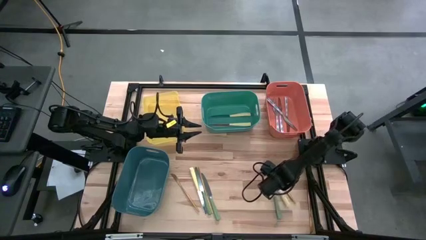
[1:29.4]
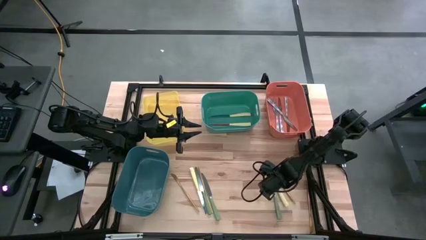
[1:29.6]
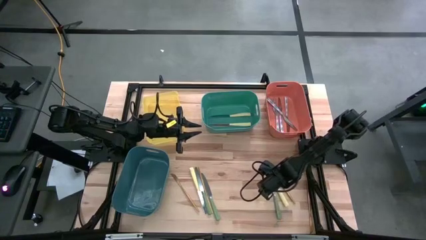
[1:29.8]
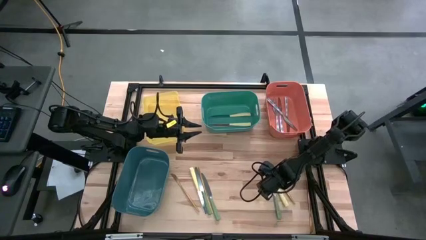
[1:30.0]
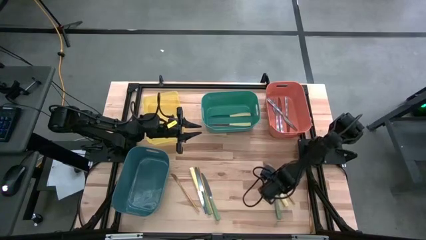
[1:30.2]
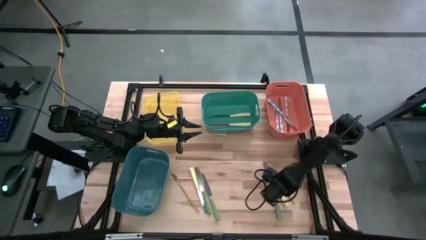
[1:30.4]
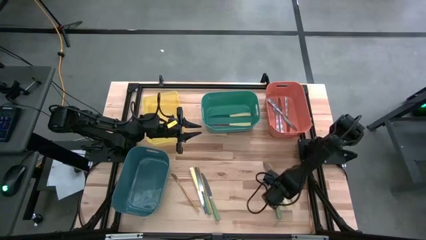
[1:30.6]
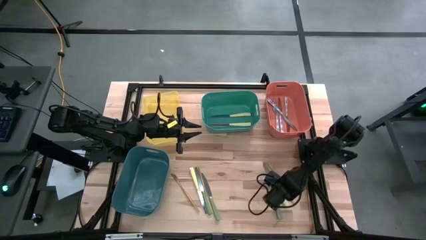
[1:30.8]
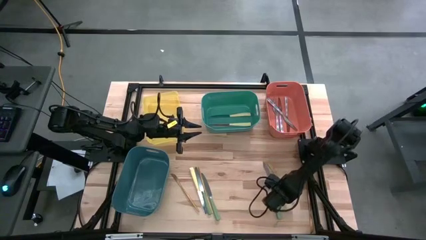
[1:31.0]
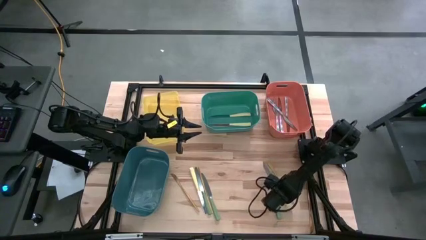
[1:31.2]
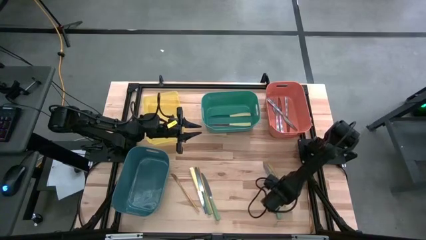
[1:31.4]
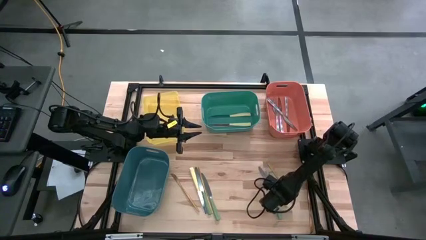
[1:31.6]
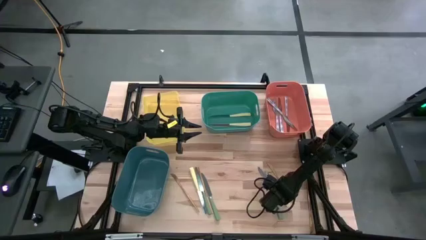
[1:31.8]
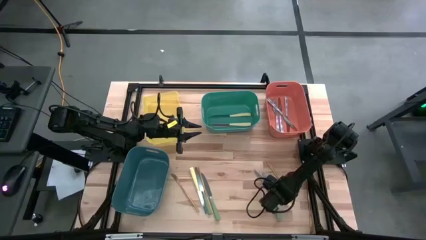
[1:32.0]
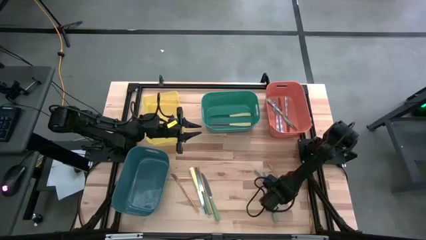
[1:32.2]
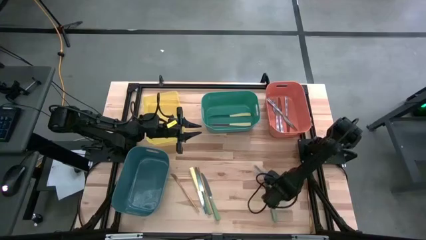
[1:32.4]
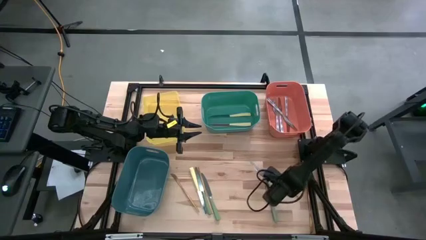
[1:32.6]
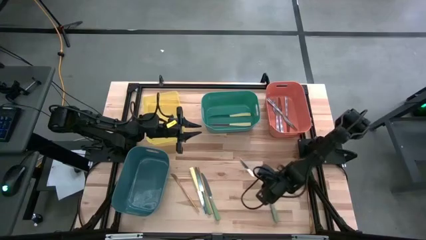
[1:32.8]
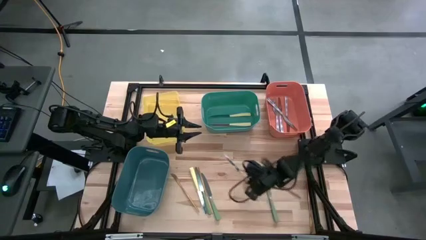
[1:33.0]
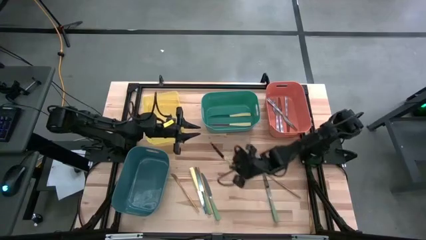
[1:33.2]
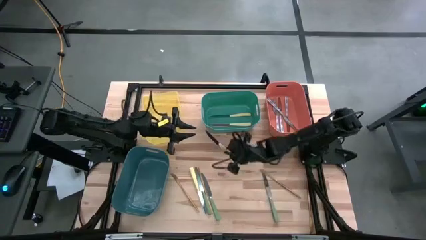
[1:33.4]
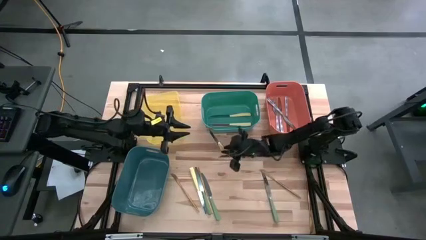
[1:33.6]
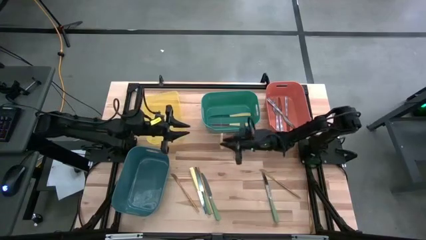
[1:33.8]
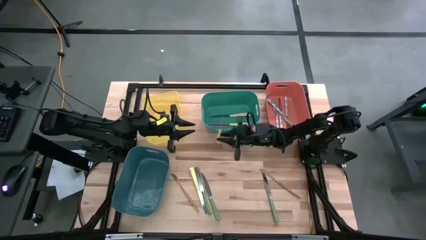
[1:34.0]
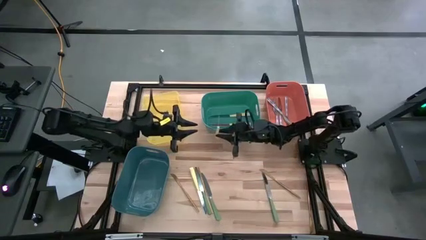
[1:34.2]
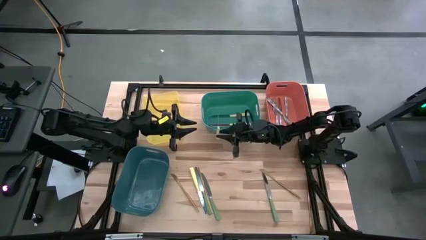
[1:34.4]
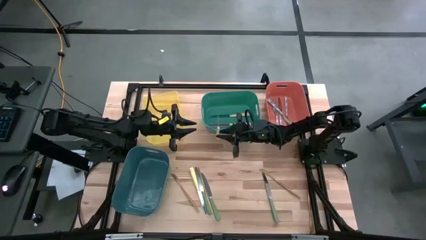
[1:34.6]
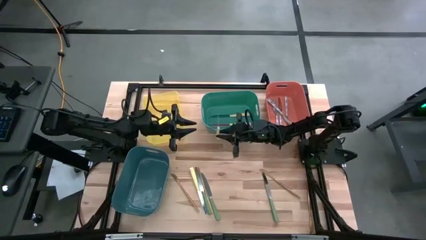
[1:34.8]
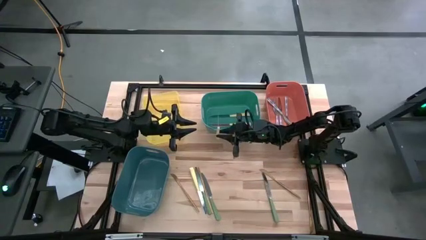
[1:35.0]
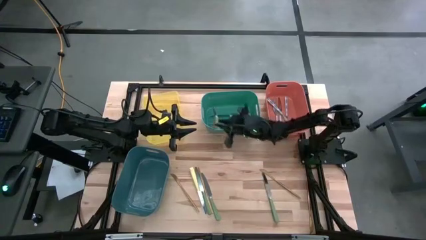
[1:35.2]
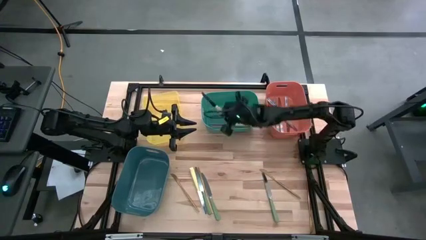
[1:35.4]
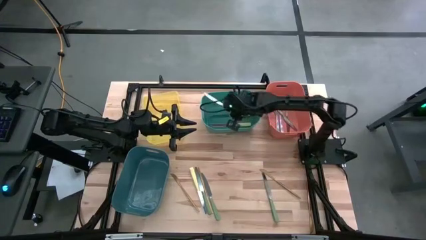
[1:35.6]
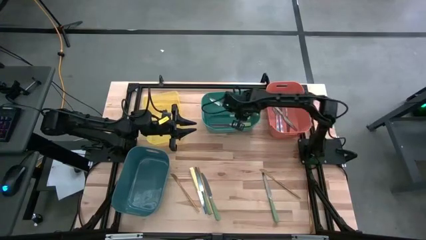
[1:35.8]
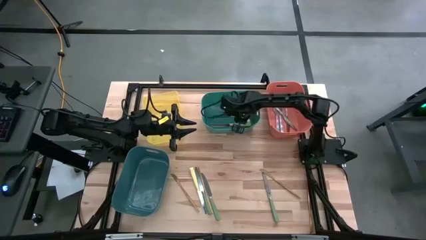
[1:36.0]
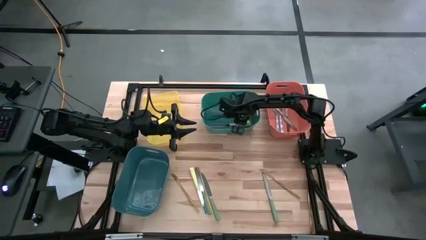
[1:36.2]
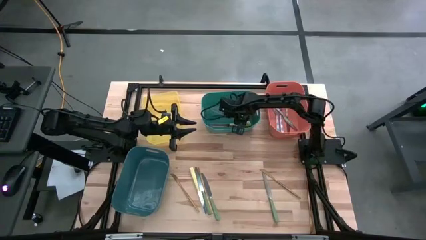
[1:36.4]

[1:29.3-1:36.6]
Task: Sort silverware by color (type)
Put the yellow knife into the green bin

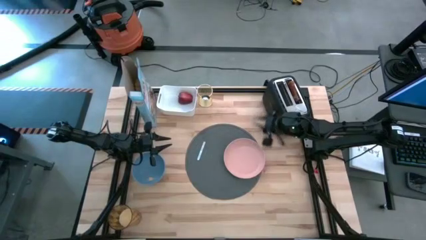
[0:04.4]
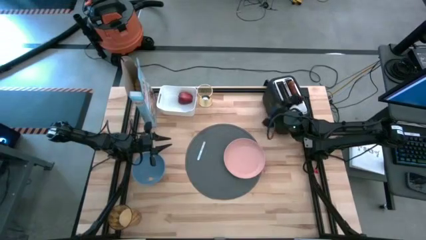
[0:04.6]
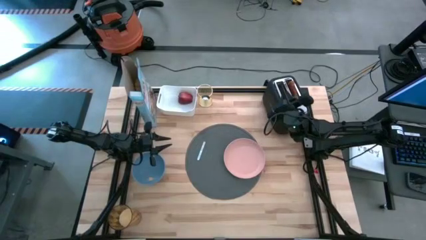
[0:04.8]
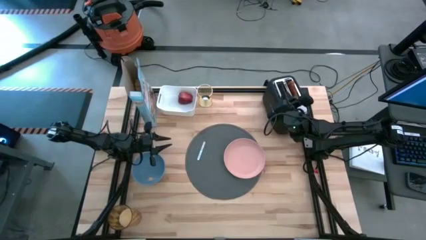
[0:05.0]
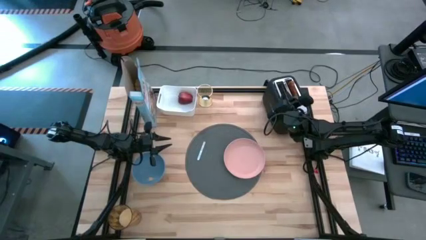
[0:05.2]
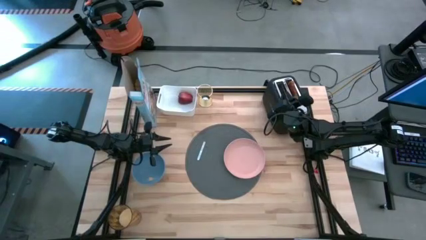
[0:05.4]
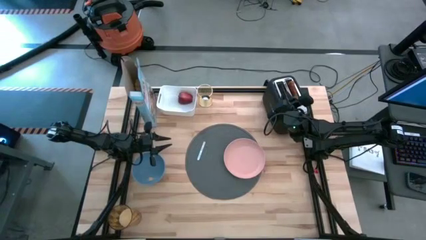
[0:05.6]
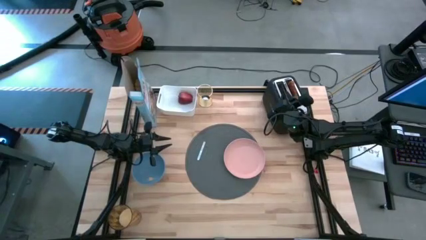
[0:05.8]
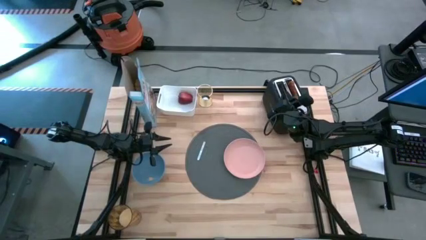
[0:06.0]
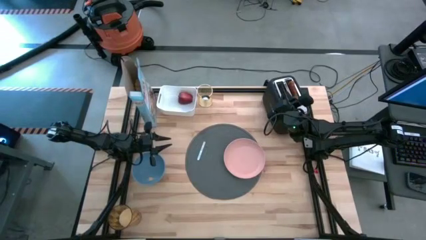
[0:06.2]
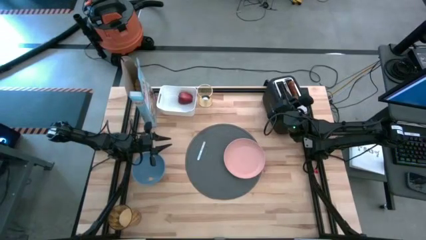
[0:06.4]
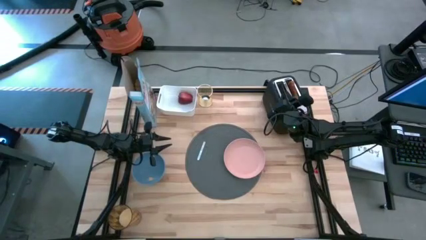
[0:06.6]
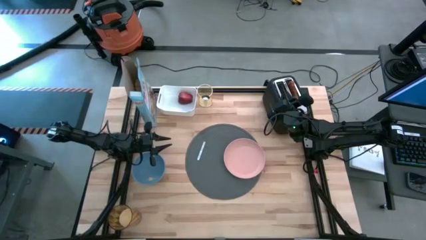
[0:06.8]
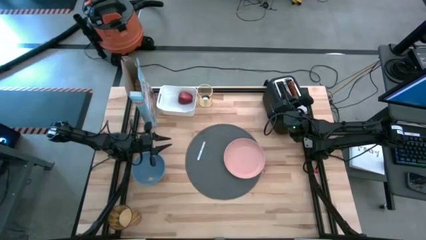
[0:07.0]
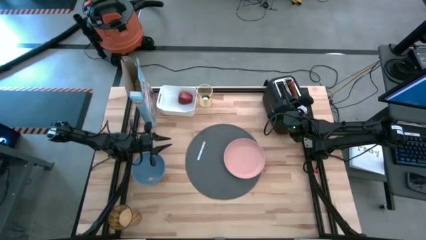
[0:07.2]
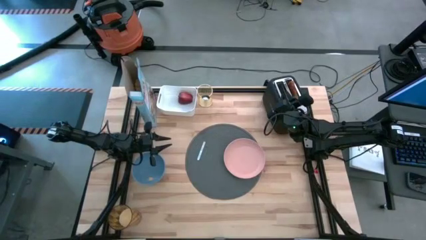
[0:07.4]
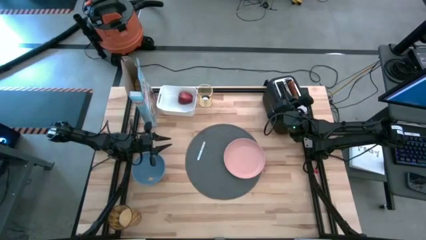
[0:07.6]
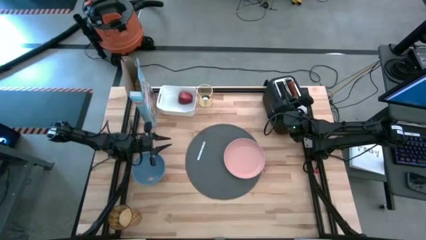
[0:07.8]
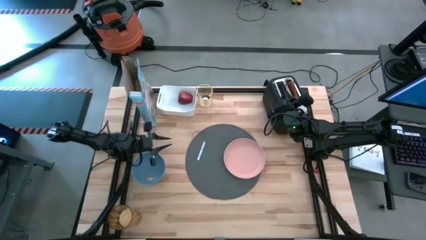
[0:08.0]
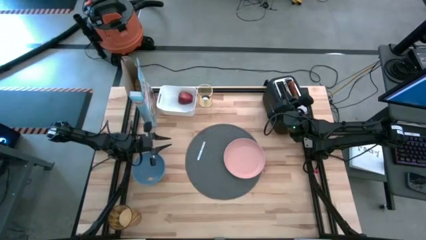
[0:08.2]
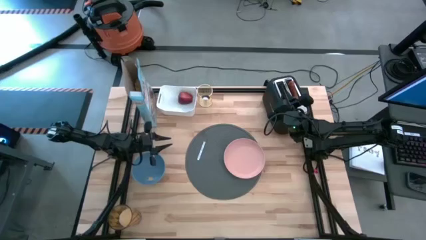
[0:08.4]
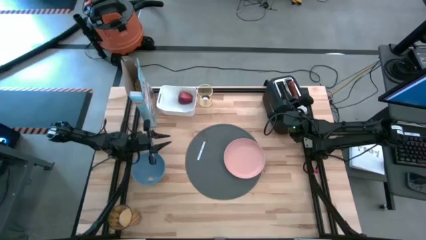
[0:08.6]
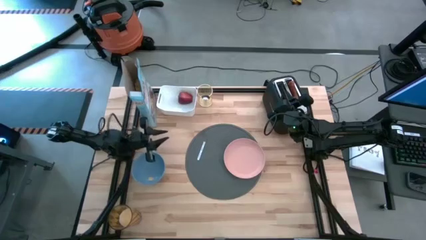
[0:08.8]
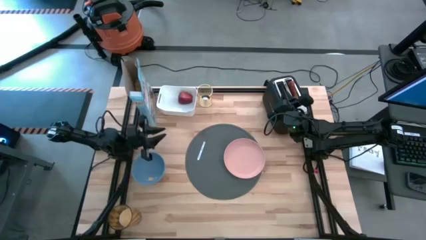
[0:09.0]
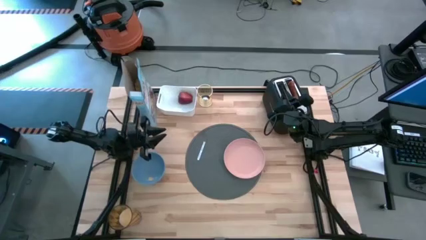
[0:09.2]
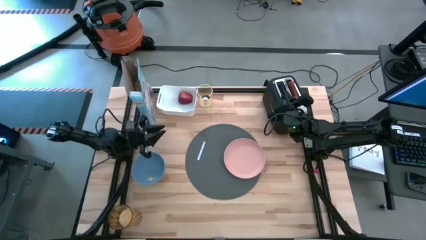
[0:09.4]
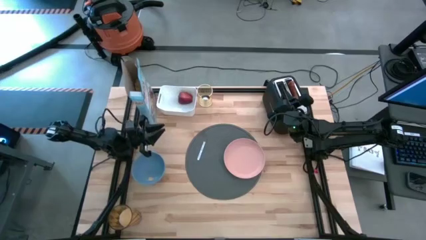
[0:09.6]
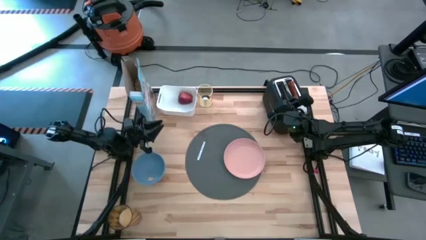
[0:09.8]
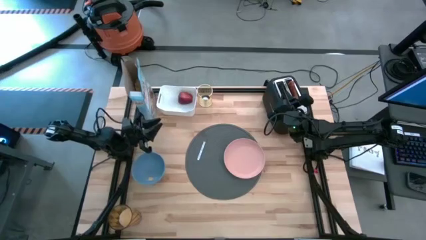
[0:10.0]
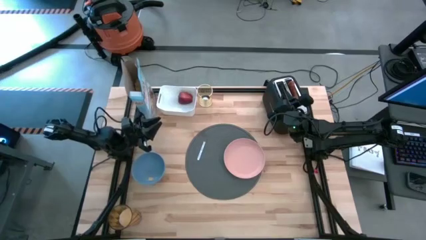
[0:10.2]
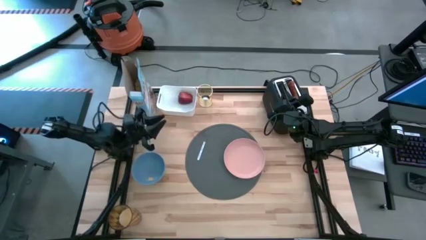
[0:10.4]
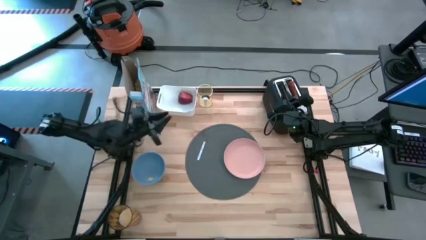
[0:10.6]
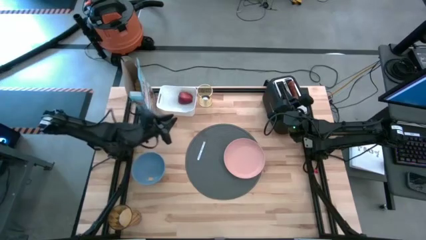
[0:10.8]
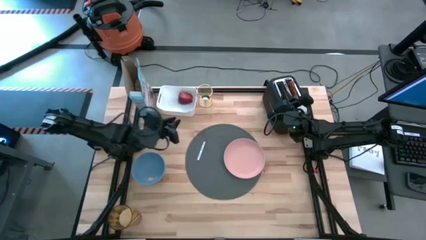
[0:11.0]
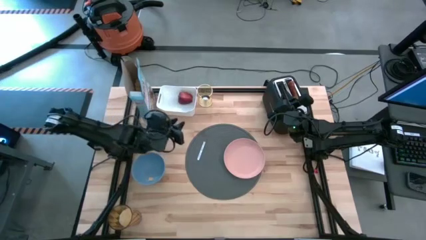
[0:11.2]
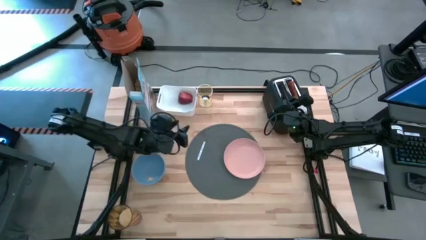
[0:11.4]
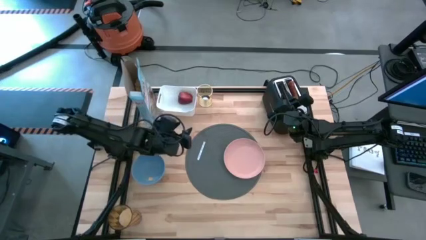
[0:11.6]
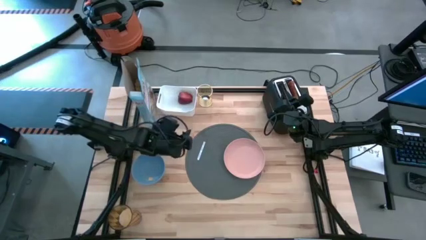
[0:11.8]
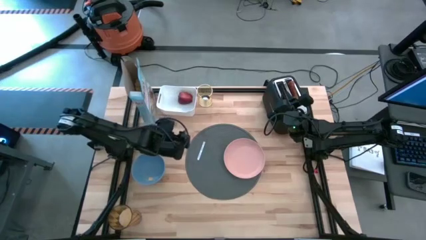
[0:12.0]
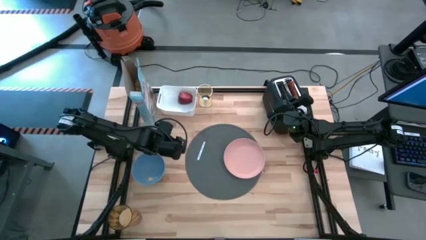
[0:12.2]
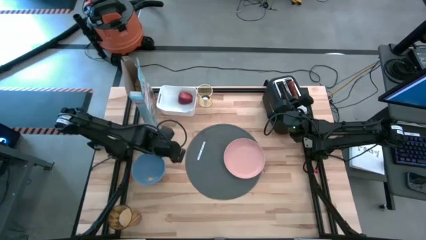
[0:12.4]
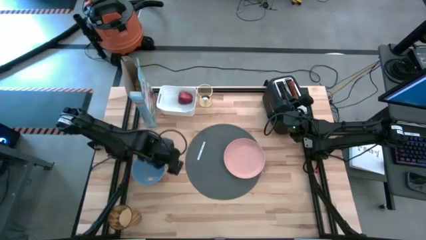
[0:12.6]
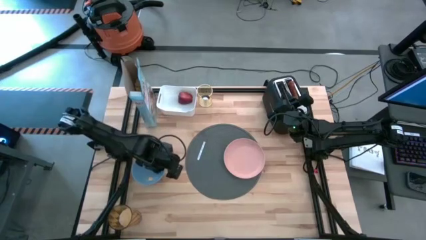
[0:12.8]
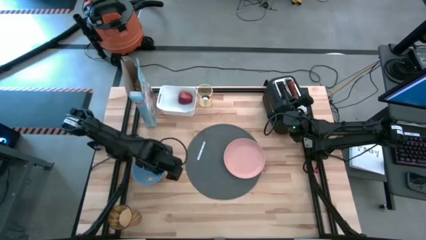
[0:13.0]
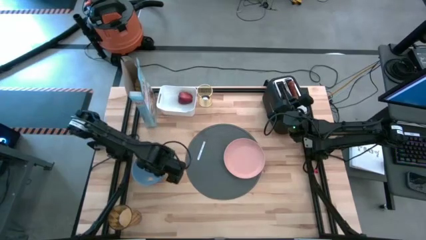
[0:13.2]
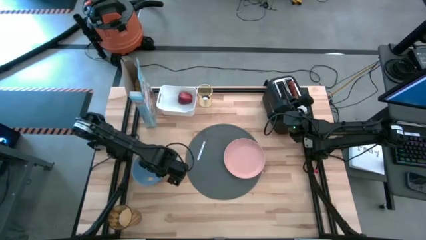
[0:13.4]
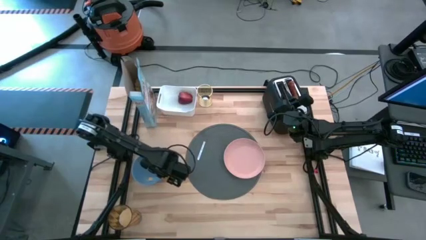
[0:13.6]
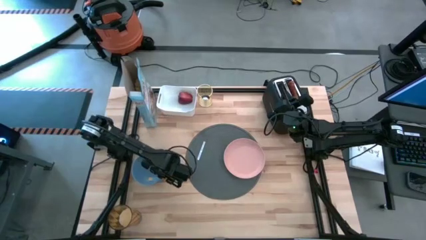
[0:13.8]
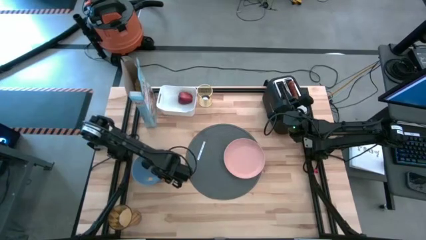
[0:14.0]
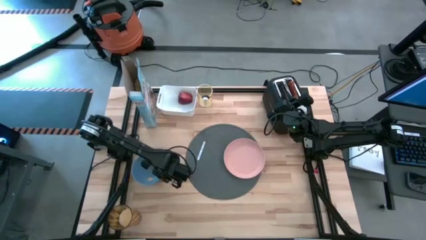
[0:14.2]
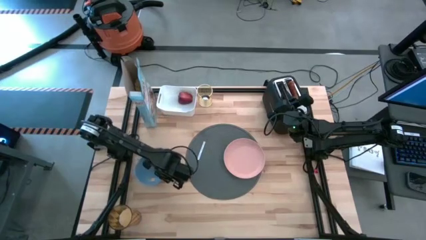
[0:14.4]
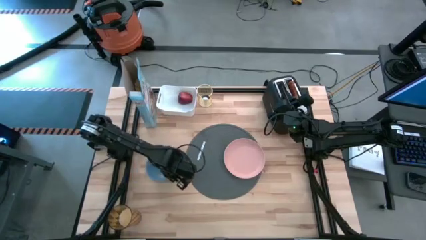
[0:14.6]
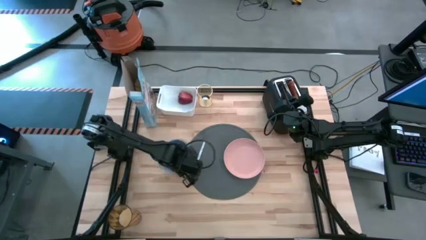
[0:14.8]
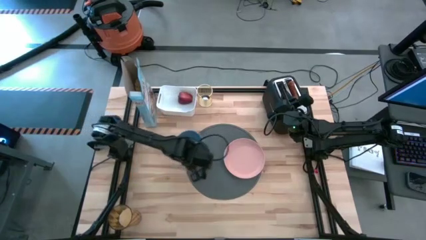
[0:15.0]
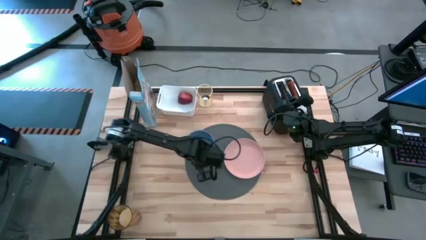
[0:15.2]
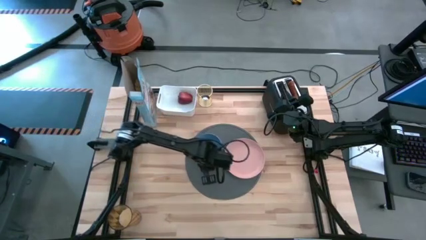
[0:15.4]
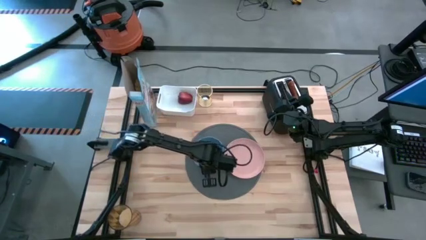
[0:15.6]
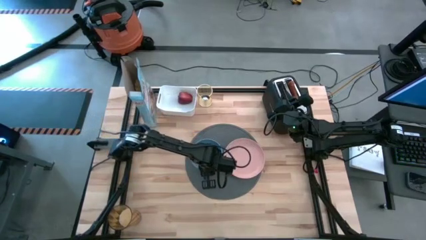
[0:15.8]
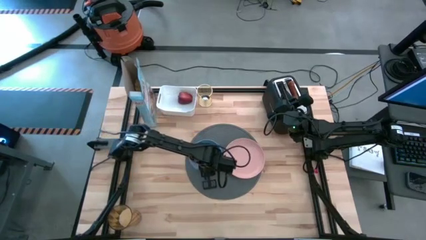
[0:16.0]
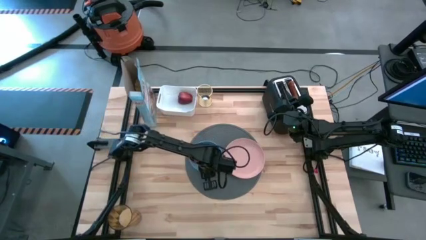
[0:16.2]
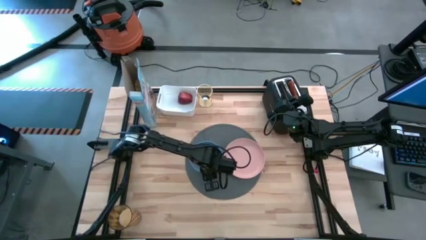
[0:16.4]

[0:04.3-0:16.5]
Task: Arrange a breakfast setting
Put the blue bowl beside the pink plate on the gray mat
